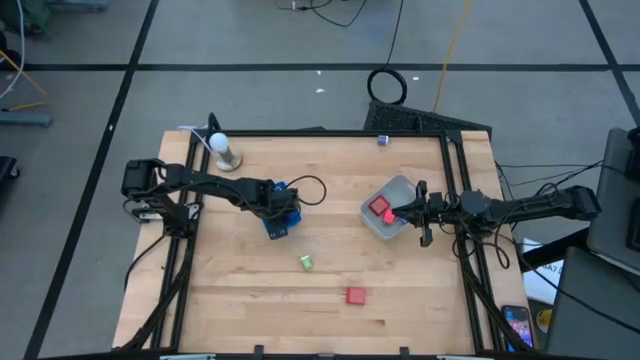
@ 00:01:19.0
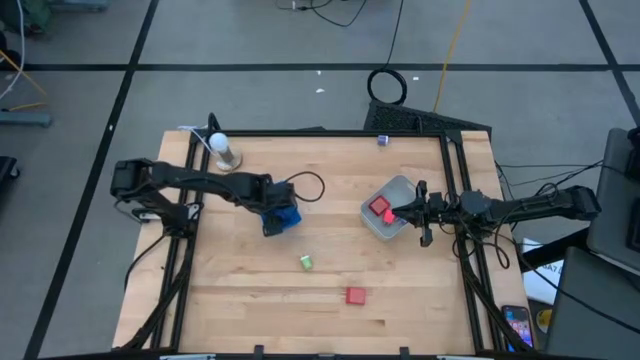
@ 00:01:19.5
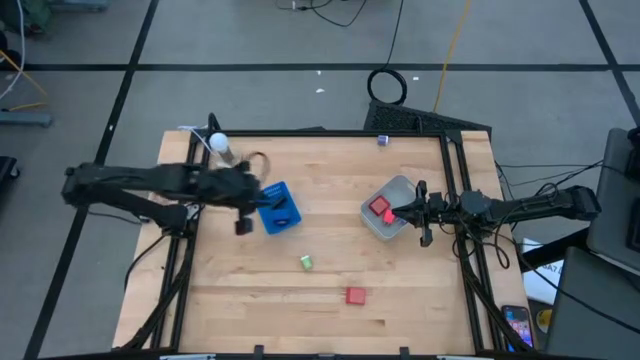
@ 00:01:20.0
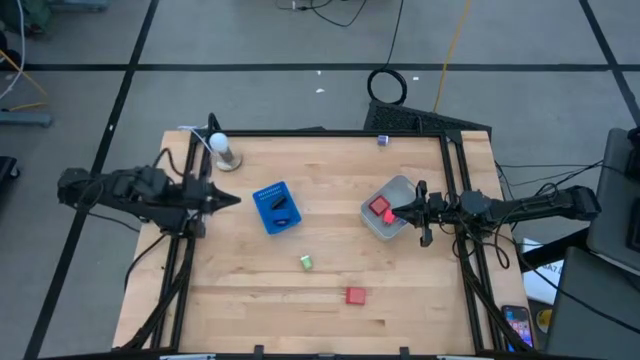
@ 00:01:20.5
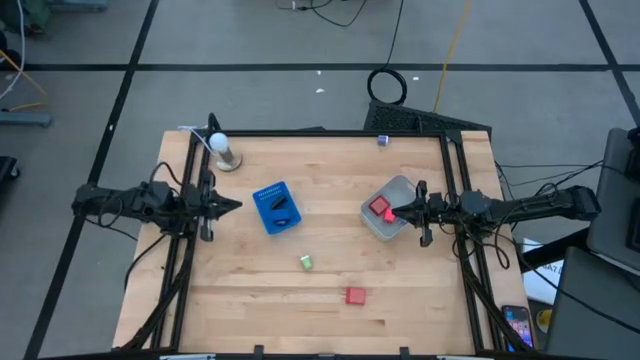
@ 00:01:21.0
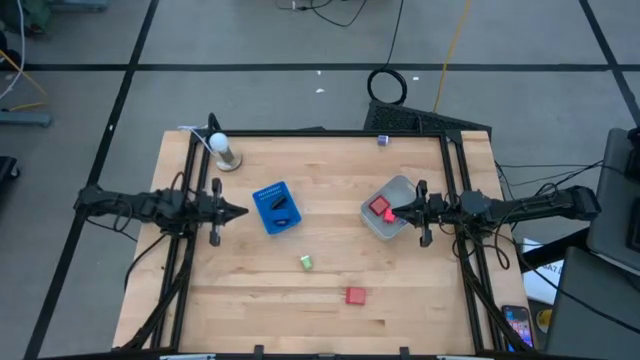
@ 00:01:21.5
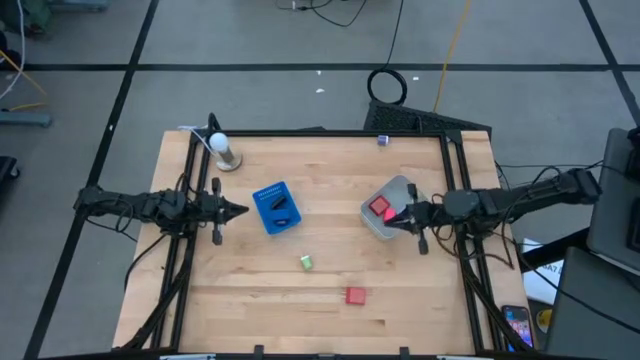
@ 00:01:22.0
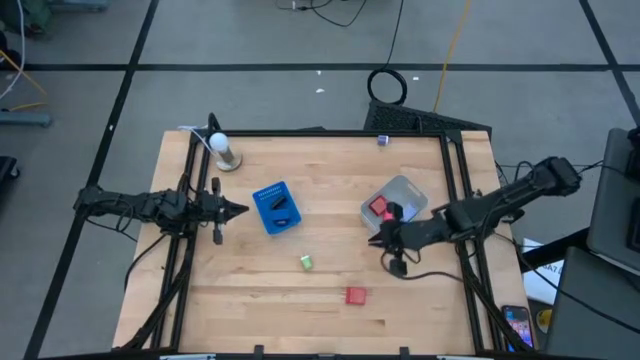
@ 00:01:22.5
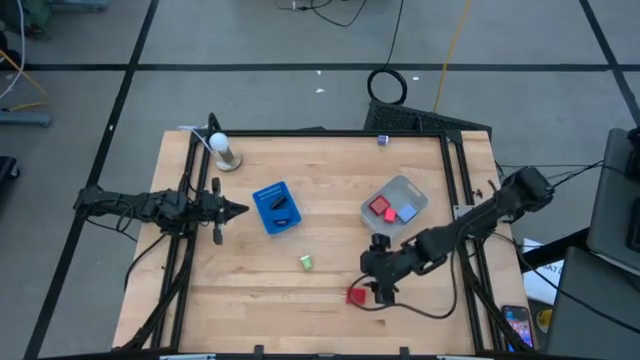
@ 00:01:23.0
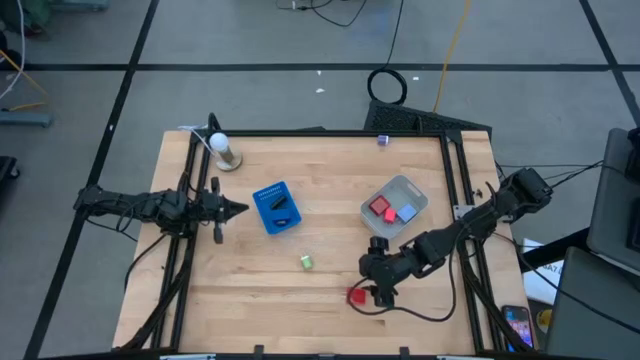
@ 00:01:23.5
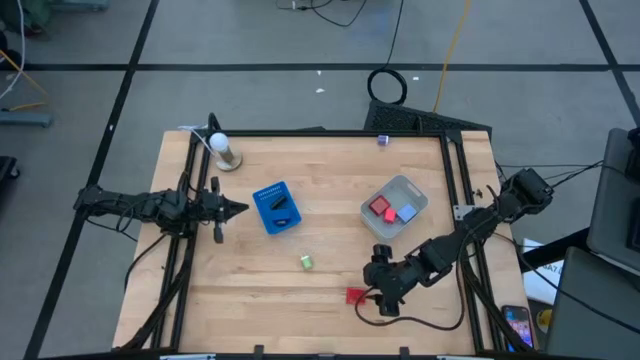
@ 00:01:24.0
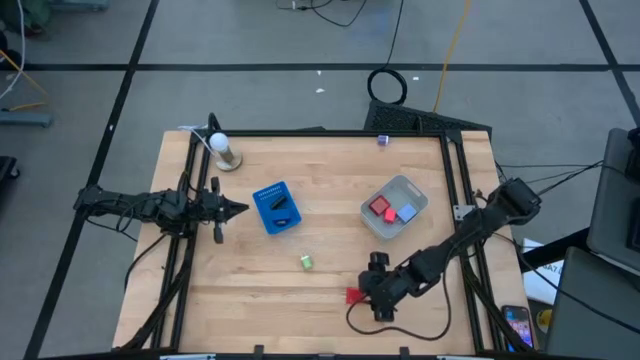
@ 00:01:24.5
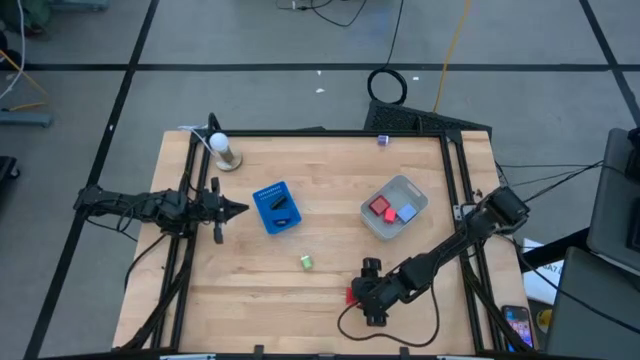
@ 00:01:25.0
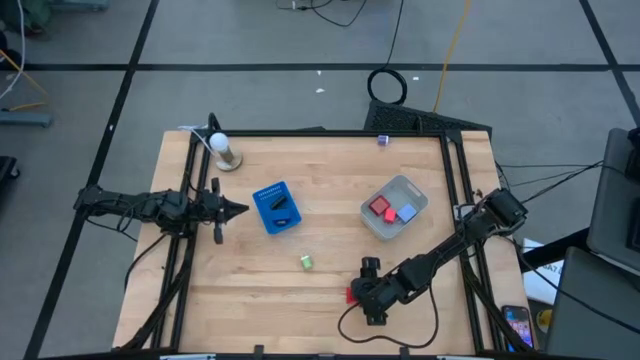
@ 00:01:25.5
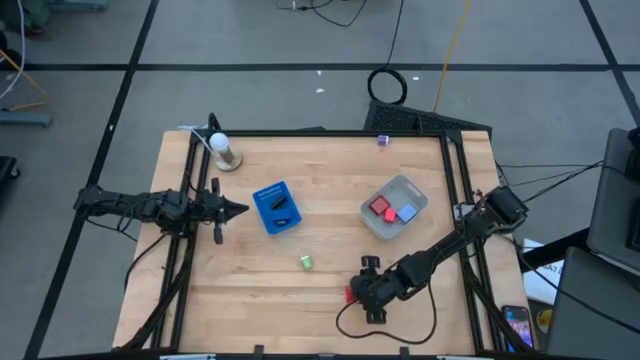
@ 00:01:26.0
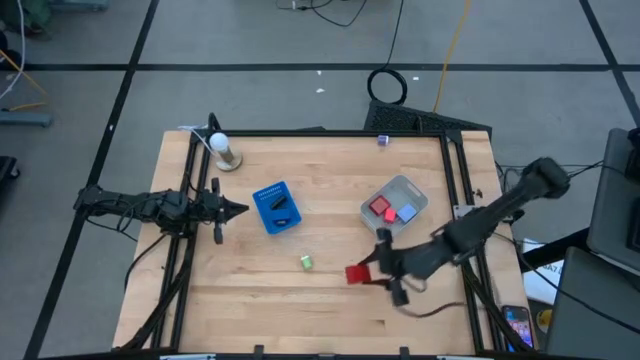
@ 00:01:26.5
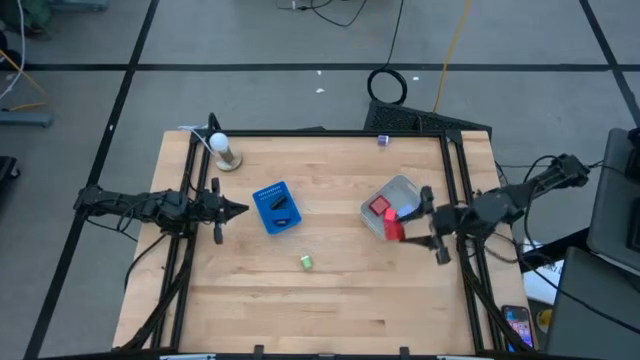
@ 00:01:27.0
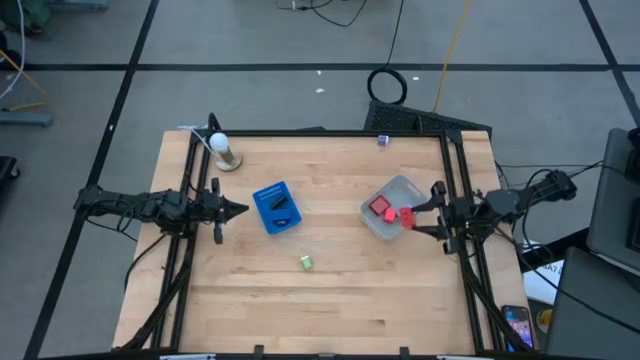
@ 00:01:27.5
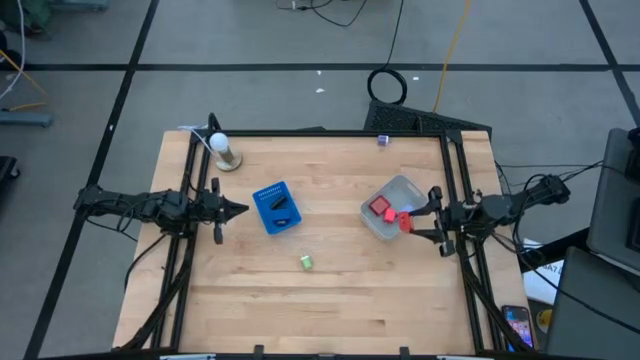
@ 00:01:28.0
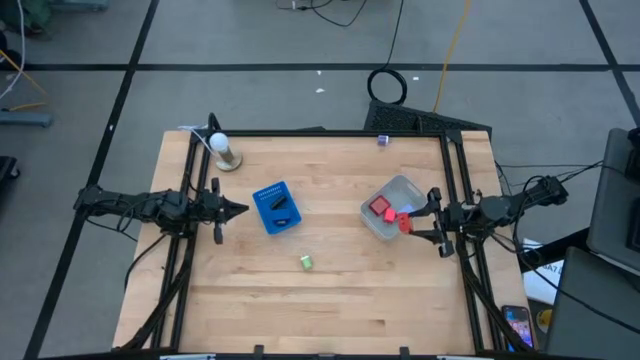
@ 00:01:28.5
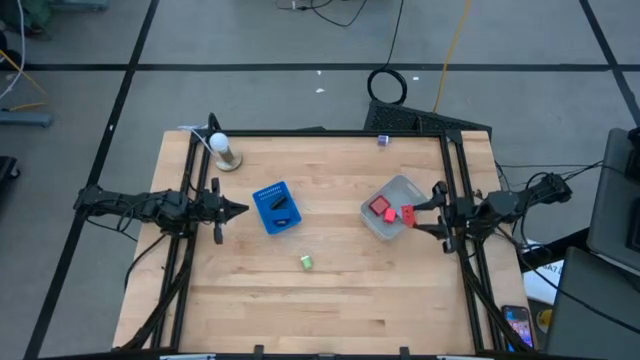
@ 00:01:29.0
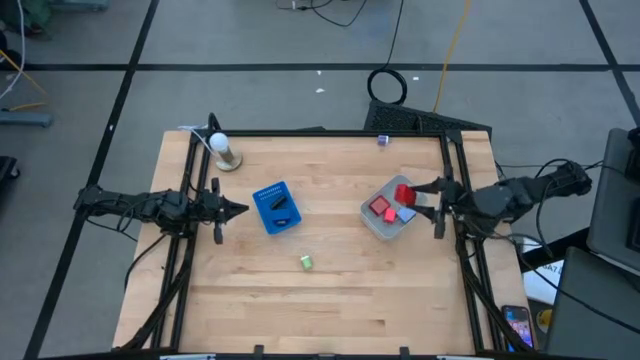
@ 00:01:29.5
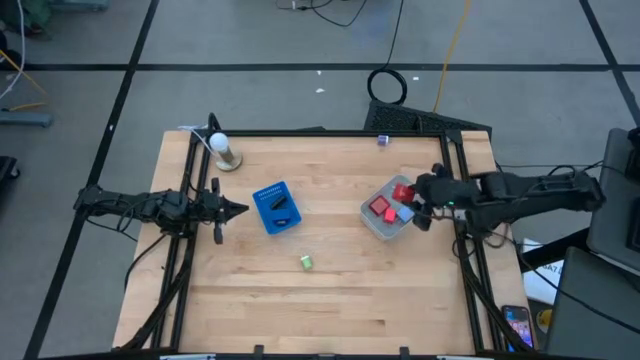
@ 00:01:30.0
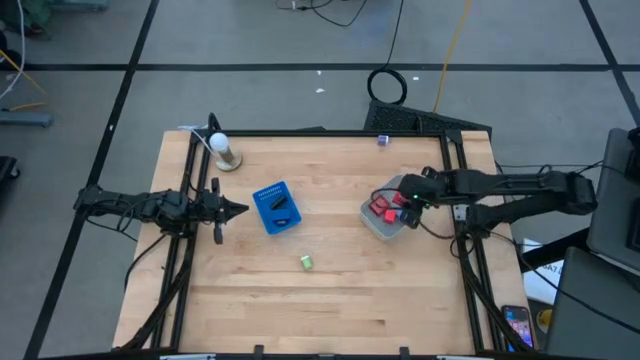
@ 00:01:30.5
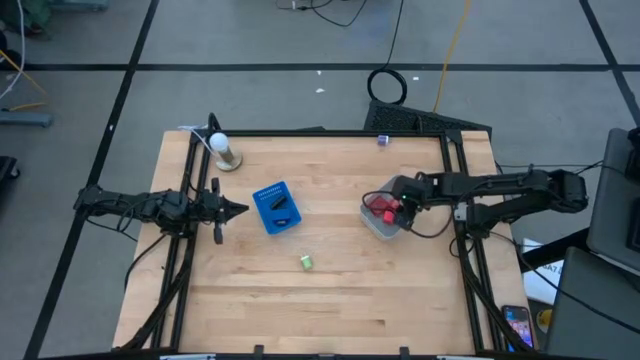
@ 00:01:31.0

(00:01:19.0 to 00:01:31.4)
Task: Pick & Place Office items
Put the red charger adapter into the grey bin

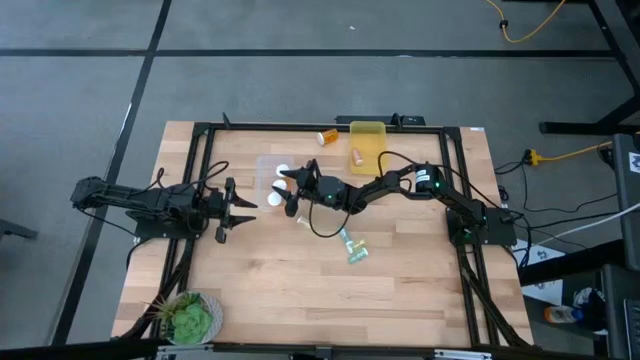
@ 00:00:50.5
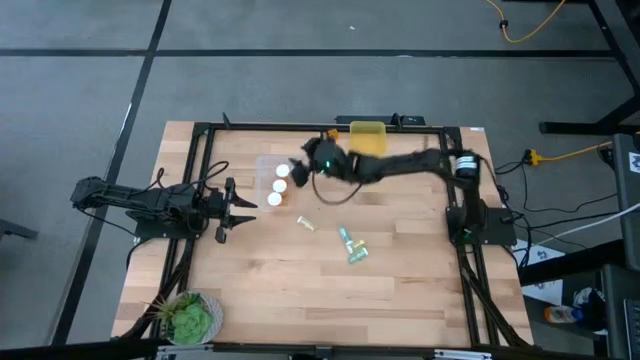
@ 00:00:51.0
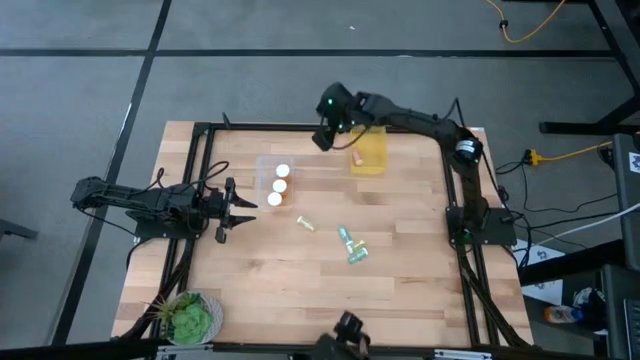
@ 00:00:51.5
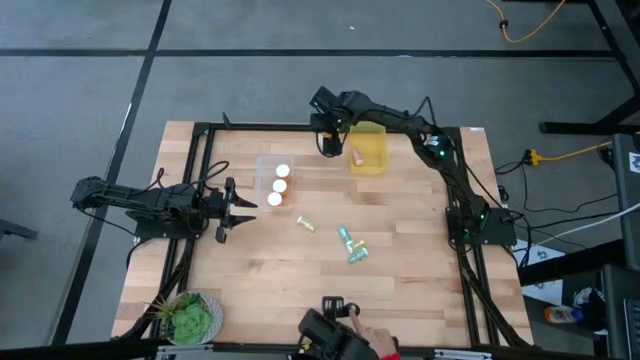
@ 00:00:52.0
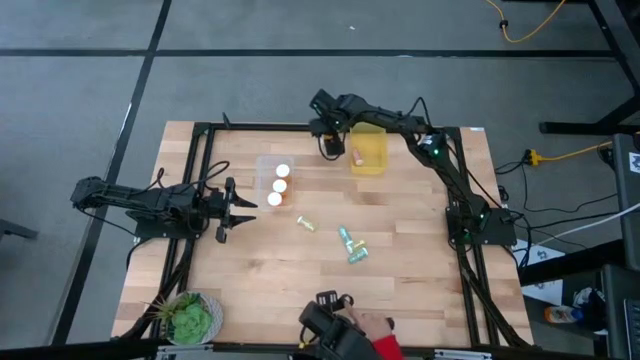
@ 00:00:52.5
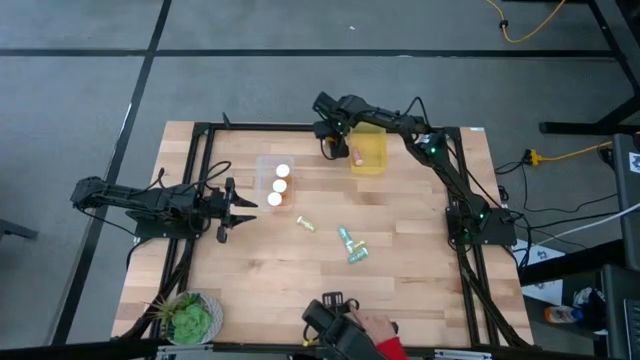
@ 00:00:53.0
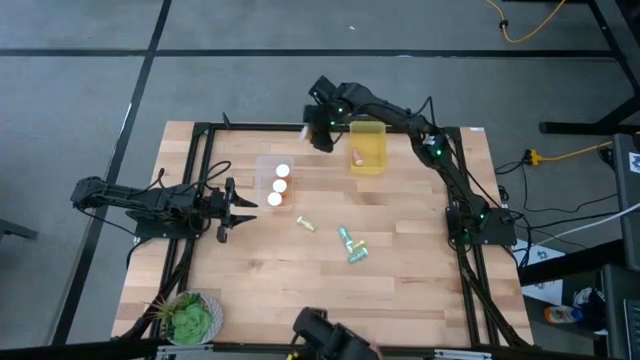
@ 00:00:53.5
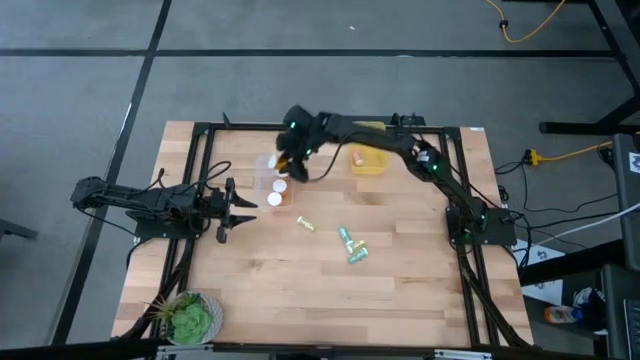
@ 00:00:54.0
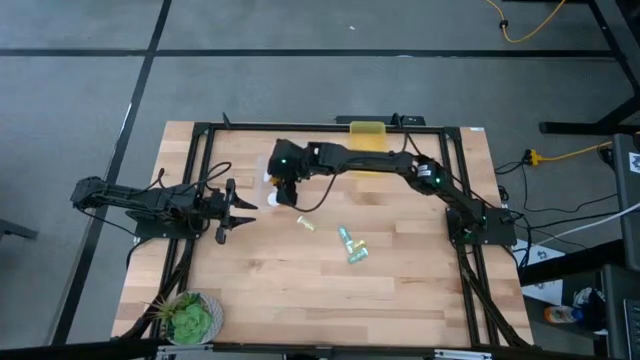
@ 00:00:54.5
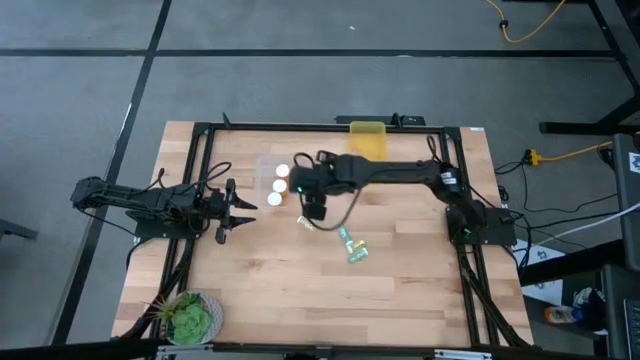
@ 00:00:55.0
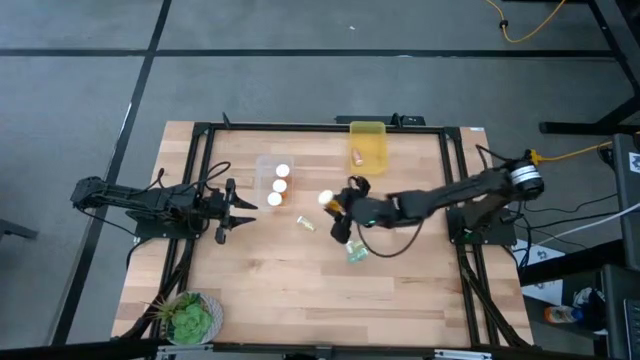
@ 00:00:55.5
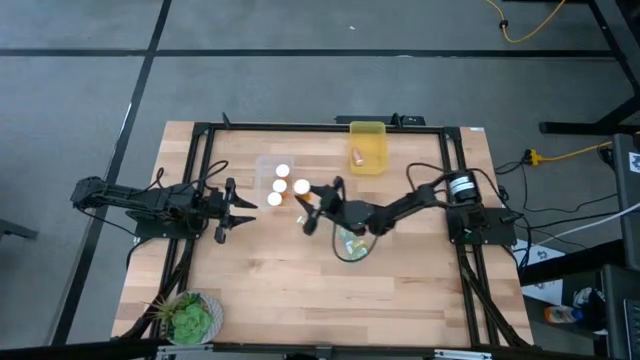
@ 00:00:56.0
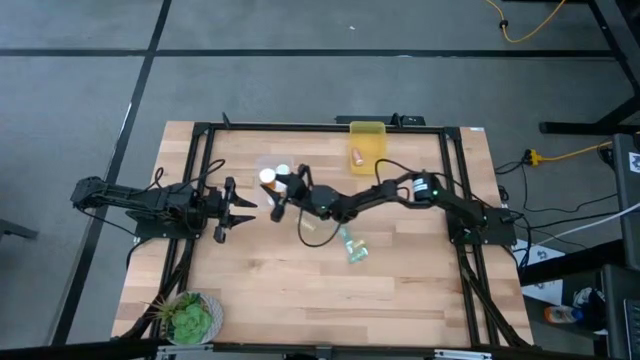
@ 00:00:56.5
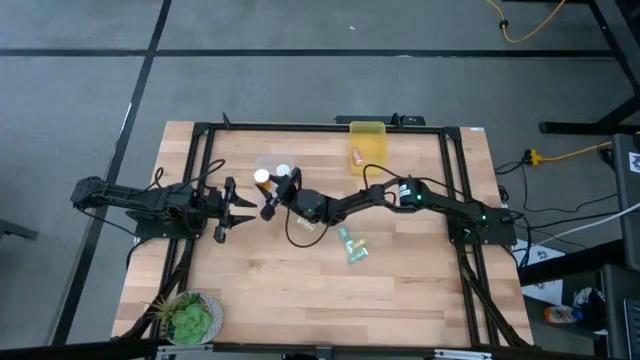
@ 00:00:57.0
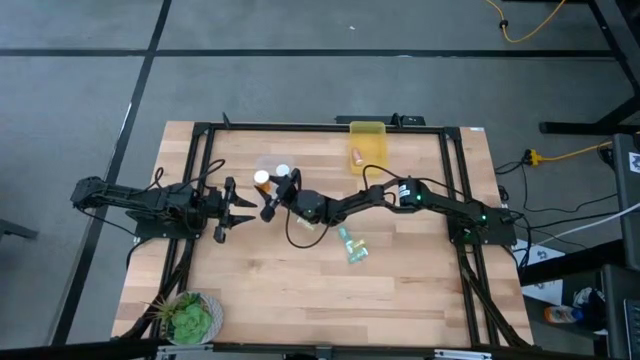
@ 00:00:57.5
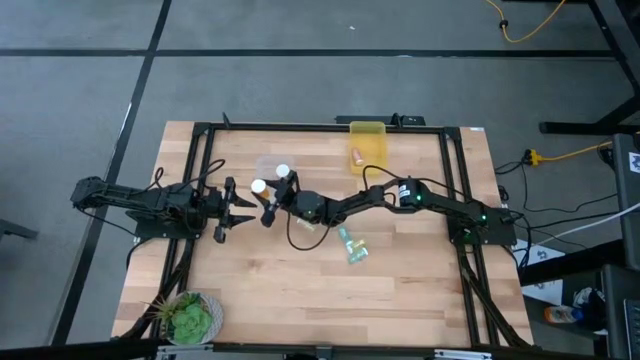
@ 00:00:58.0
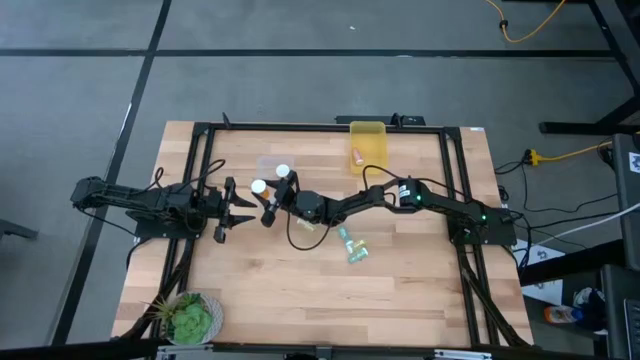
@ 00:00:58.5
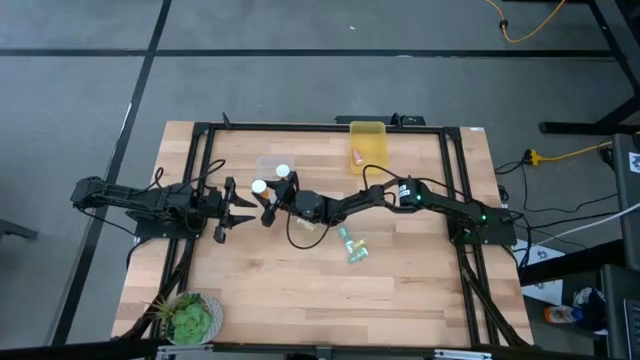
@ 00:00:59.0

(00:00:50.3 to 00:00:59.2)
Task: Pick and place medicine bottles into bin by pill shape (circle, oval)
Put the large orange pill bottle into the transparent bin
